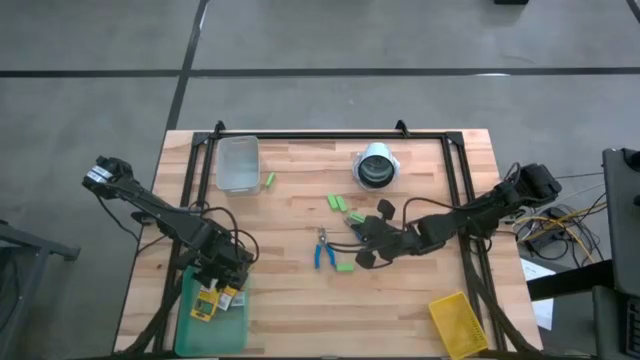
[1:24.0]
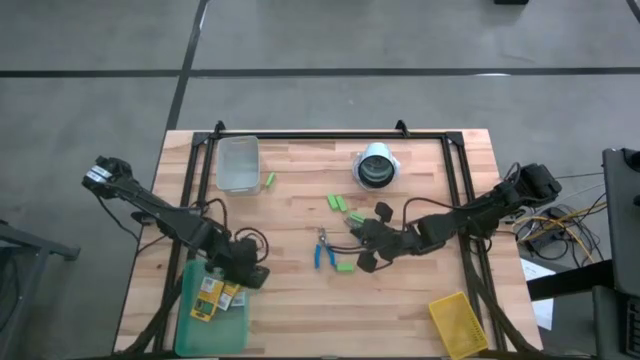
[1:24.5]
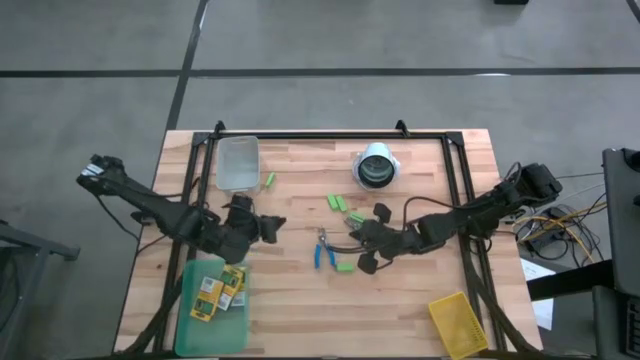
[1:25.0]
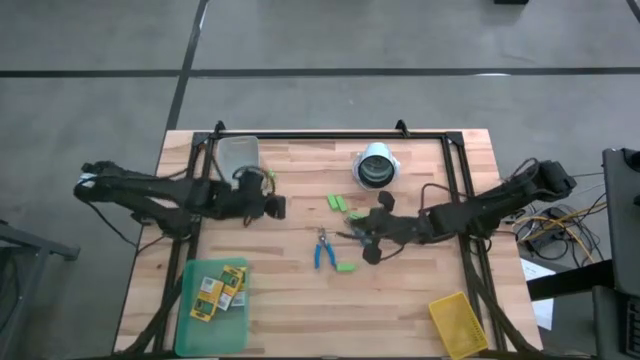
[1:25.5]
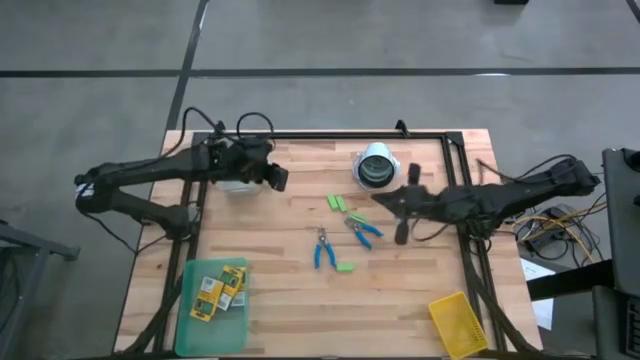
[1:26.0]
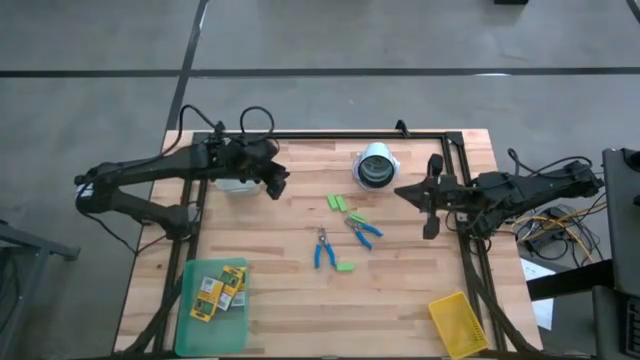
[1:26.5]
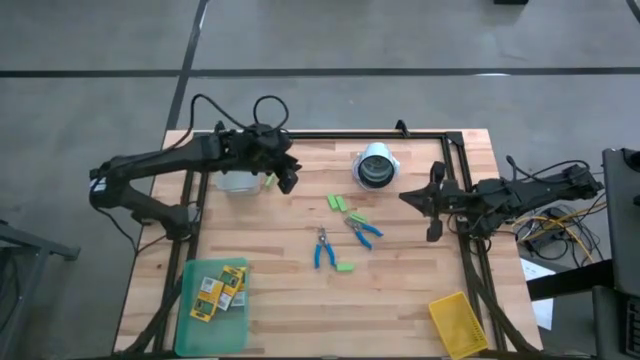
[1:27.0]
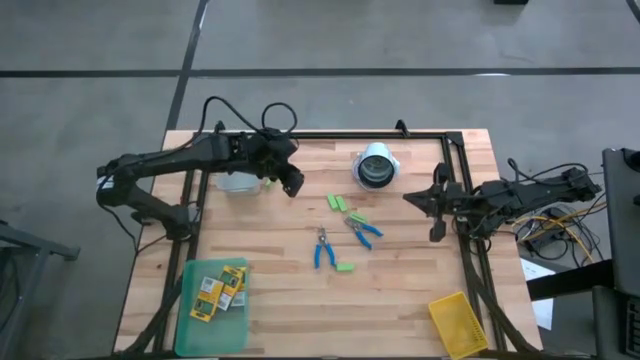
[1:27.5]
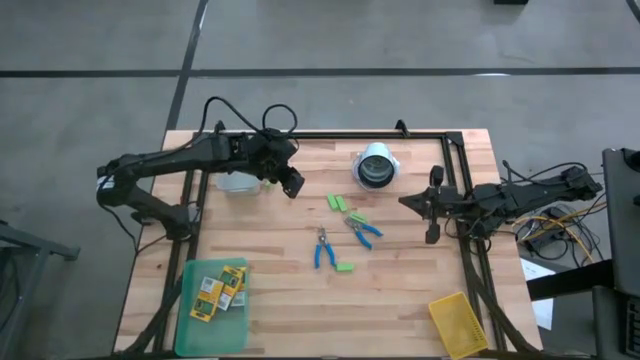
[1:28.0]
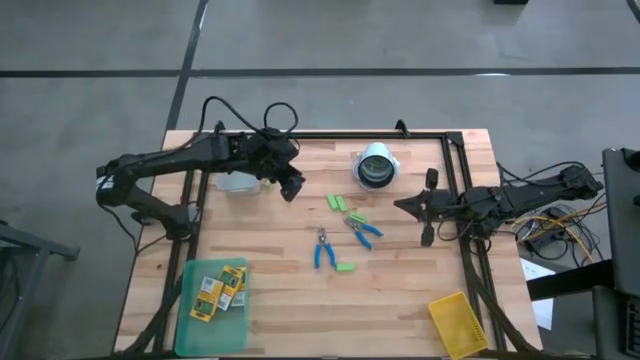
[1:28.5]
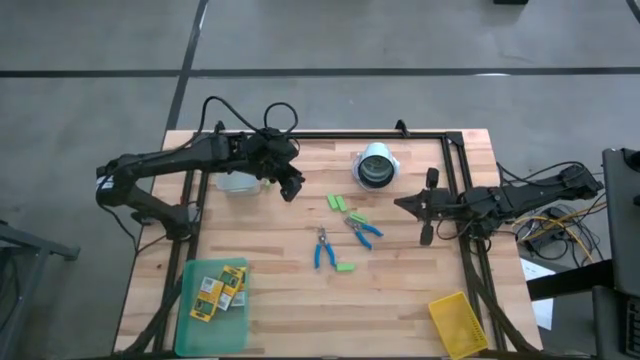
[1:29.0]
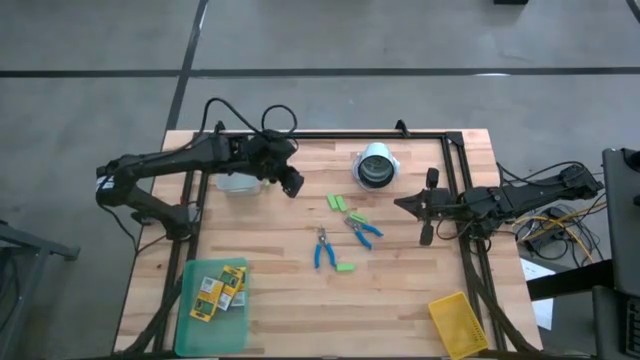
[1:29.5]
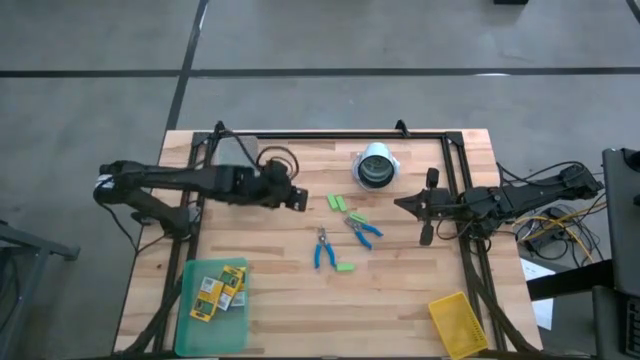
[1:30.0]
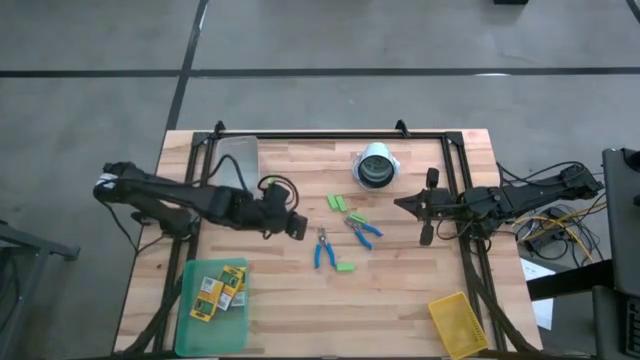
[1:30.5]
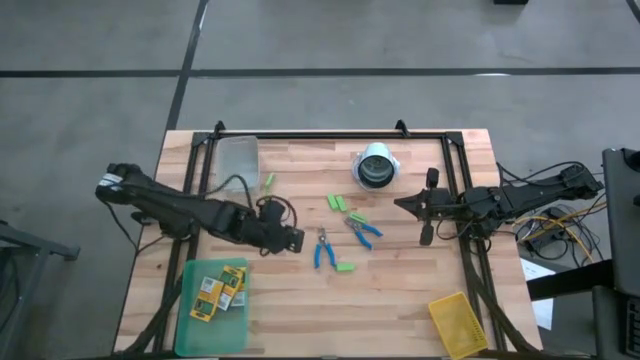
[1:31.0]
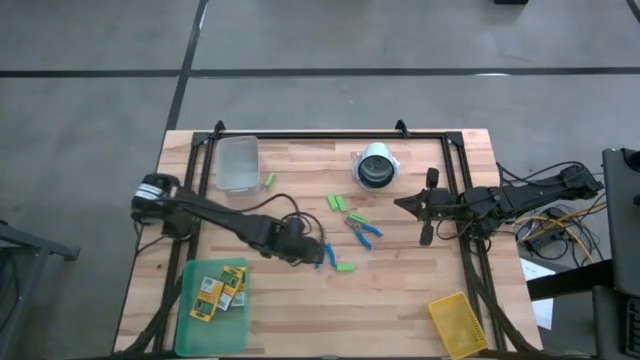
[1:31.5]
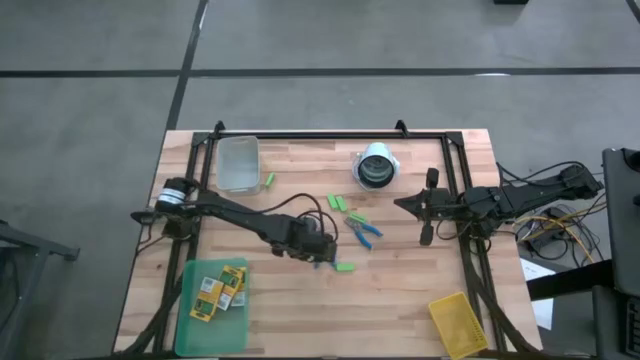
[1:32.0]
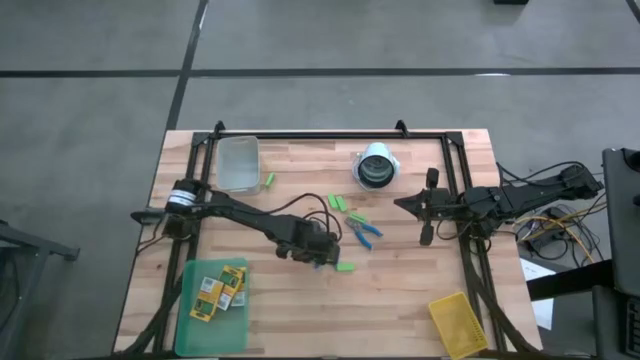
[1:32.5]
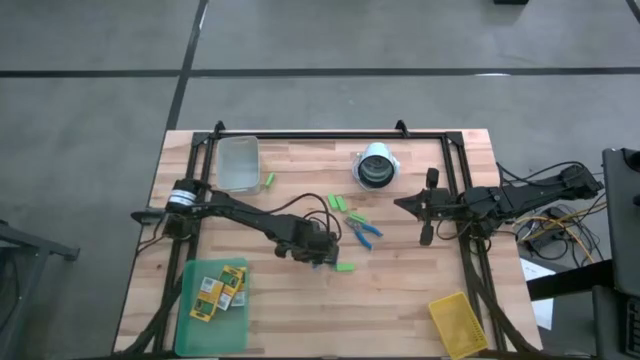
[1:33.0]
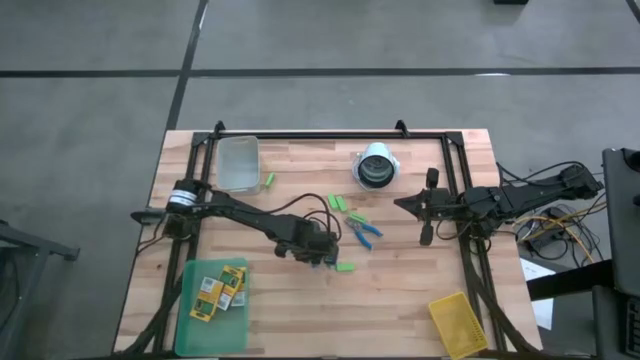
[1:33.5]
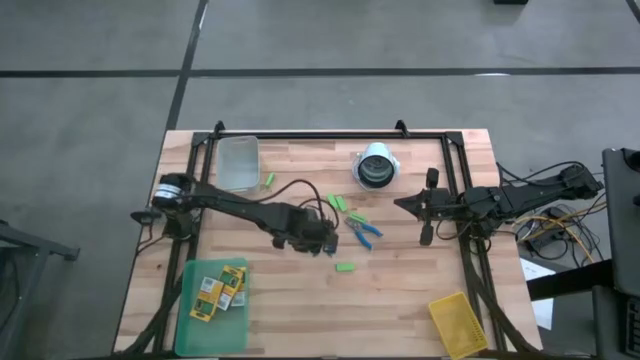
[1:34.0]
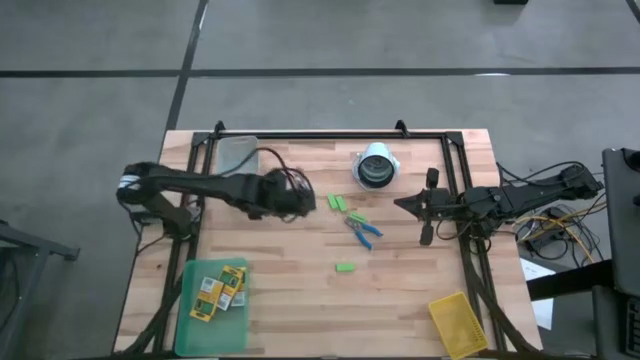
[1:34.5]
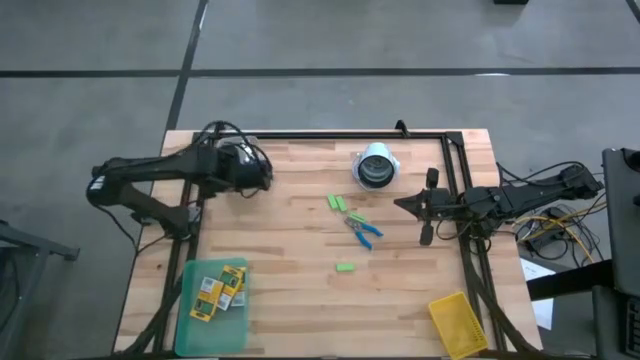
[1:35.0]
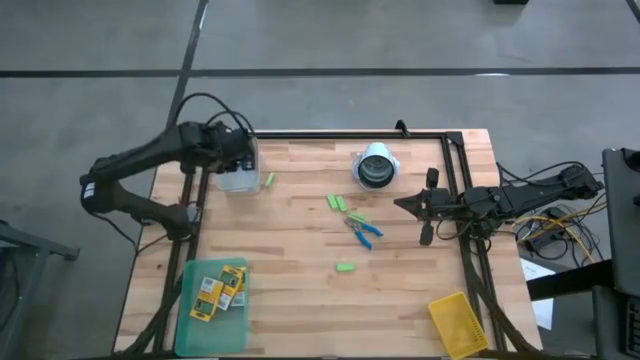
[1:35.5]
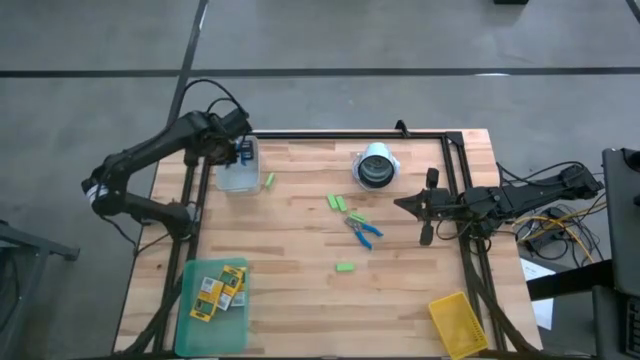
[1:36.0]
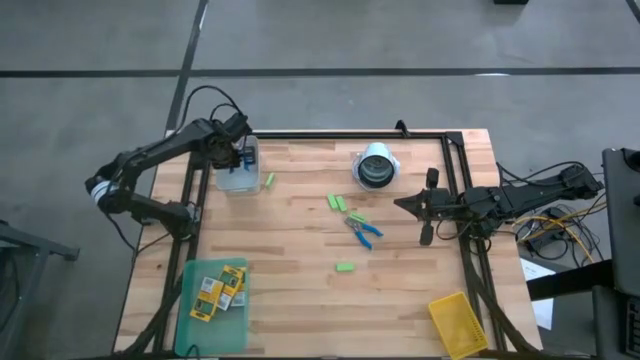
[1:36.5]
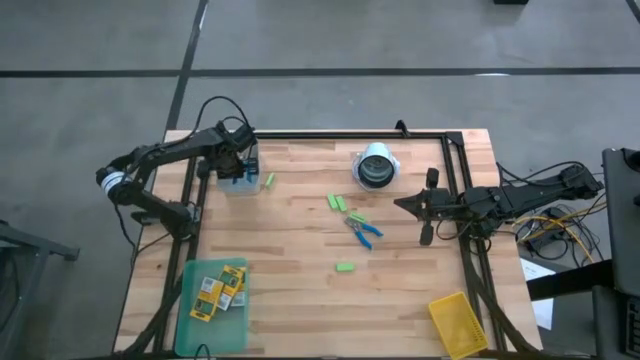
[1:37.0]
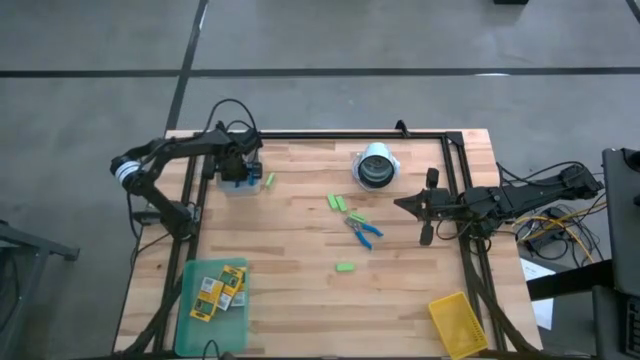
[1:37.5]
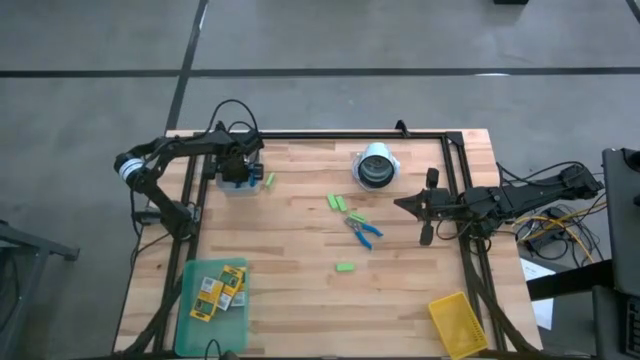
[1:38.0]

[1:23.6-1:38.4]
Task: Pick & Place School Supplies
Put the blue puncher hole into the gray bin

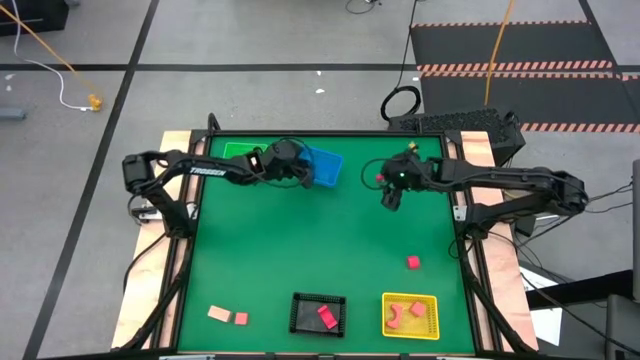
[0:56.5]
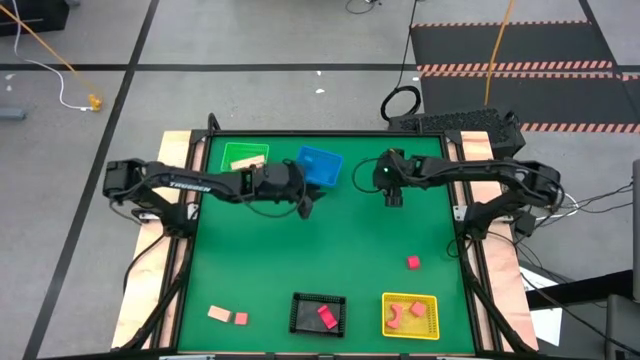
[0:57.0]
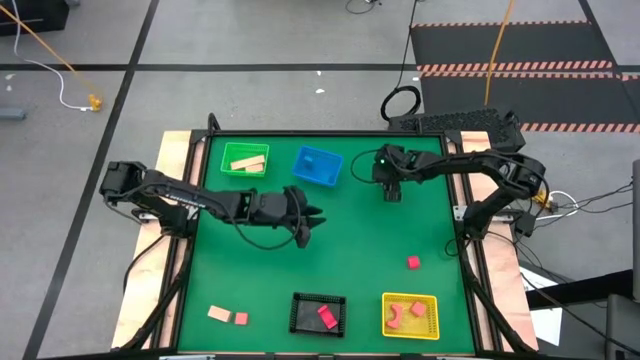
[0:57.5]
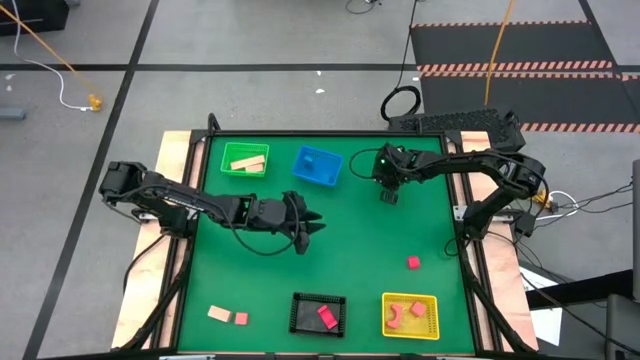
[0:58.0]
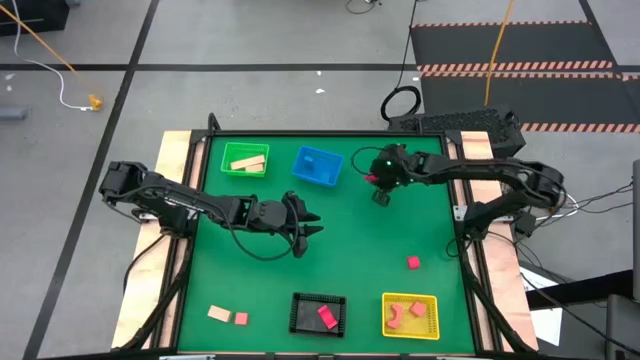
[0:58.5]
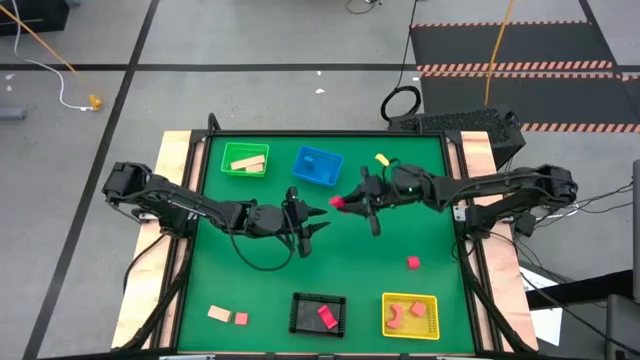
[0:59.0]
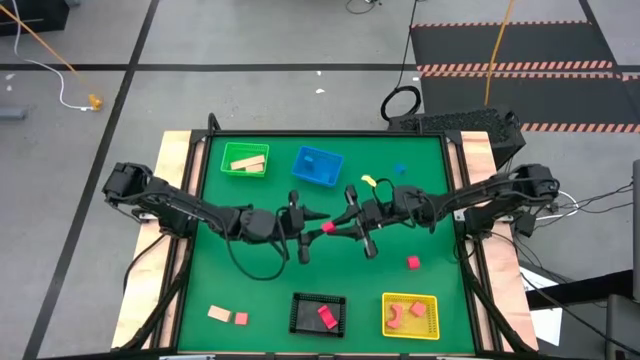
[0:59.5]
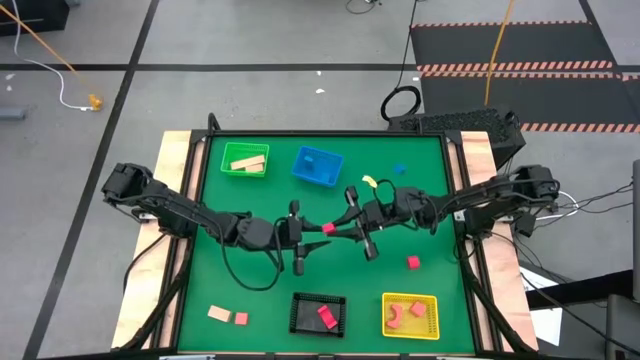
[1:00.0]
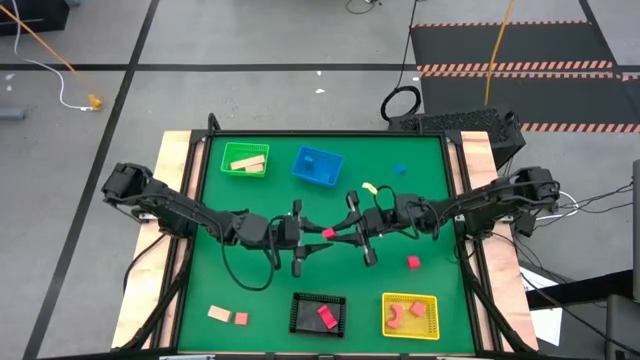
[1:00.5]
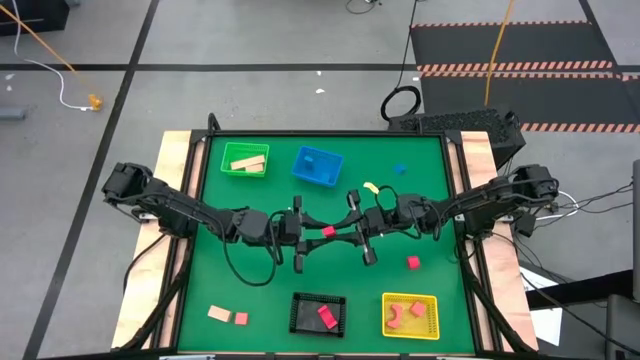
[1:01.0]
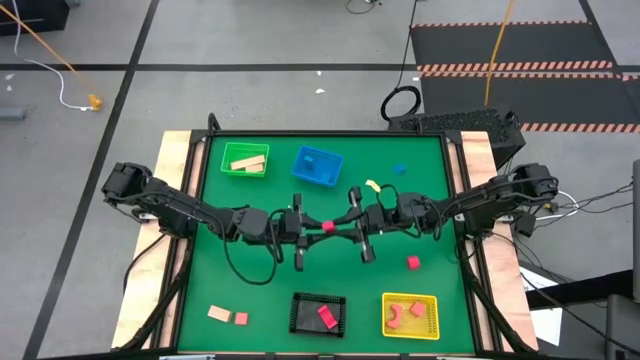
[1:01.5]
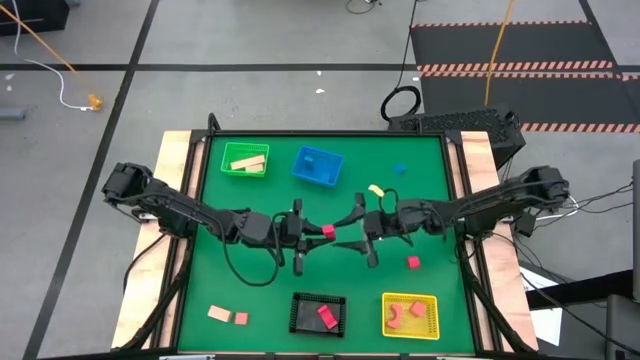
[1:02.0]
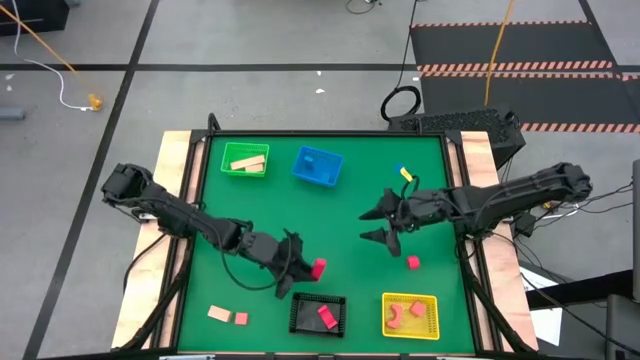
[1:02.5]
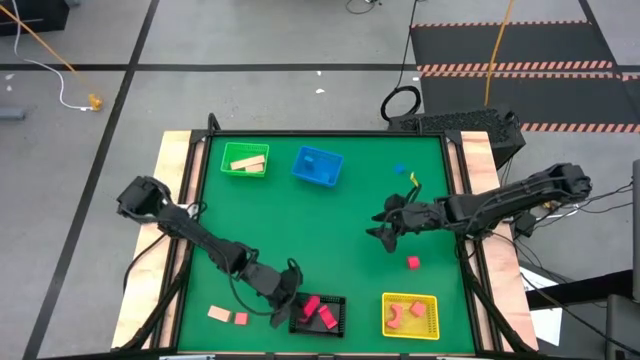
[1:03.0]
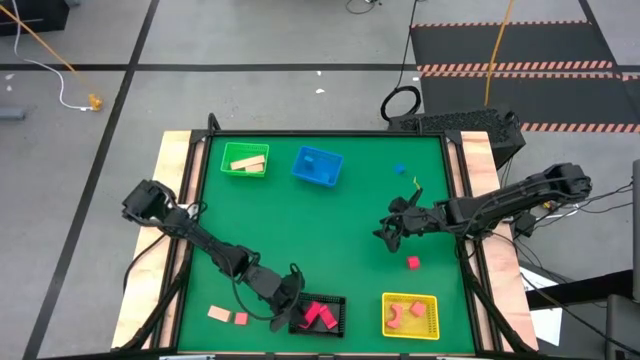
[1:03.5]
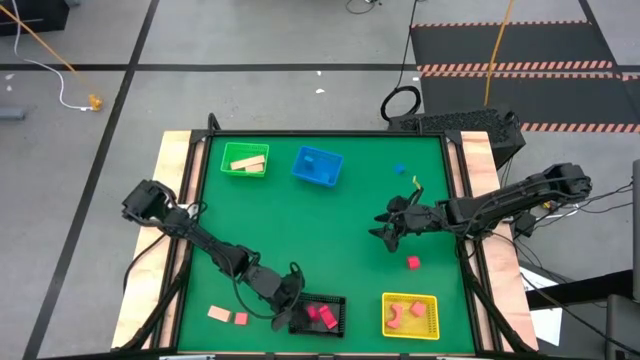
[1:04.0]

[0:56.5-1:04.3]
Task: Sort & place blocks by color
Put the top red wooden block into the black basket
